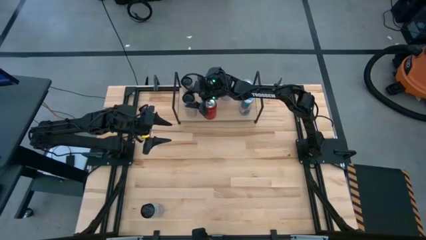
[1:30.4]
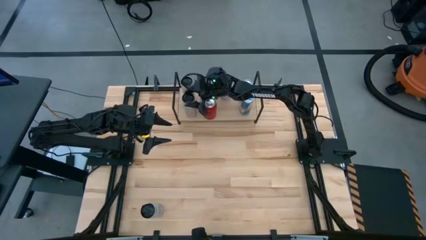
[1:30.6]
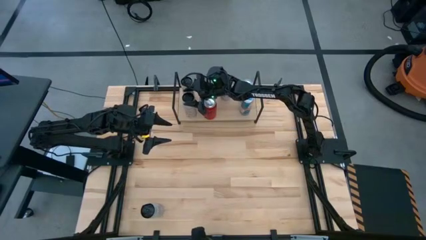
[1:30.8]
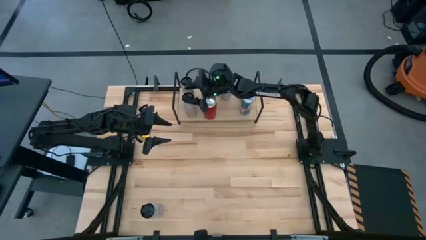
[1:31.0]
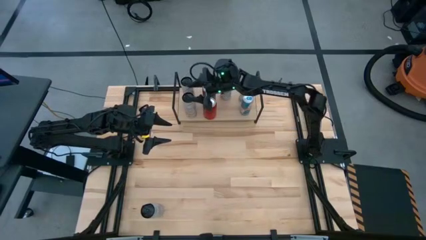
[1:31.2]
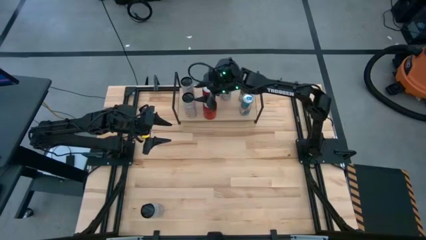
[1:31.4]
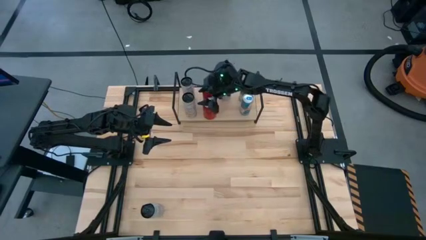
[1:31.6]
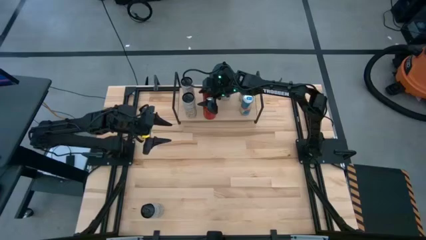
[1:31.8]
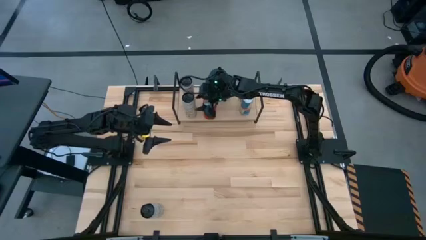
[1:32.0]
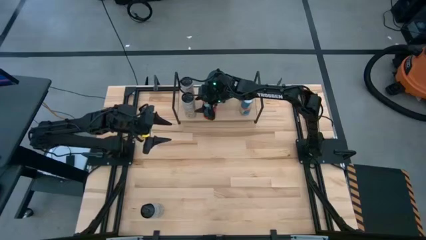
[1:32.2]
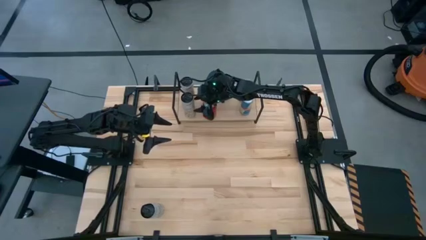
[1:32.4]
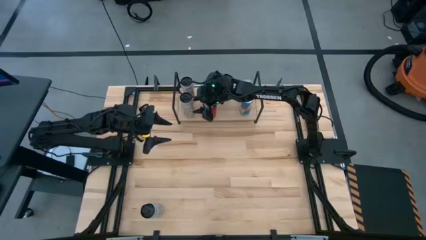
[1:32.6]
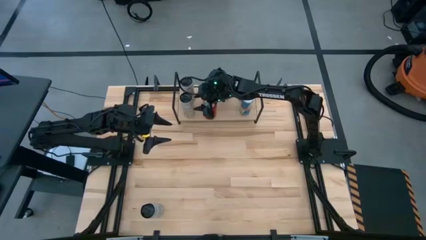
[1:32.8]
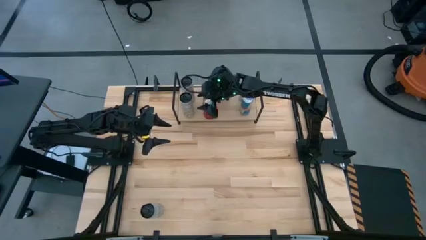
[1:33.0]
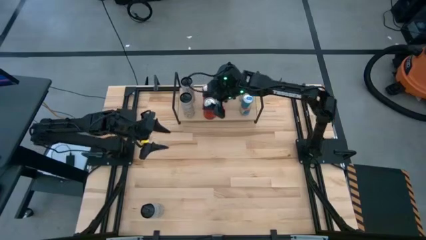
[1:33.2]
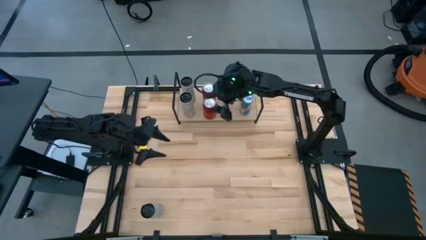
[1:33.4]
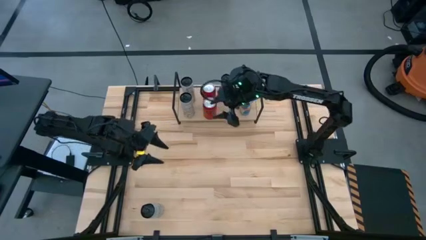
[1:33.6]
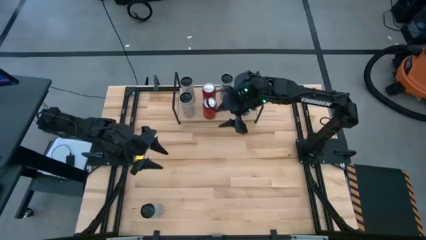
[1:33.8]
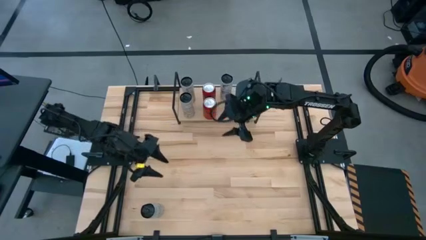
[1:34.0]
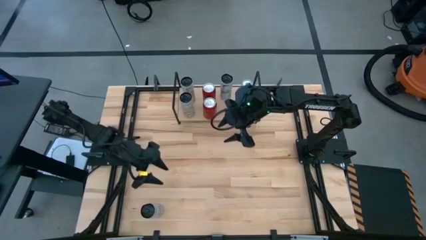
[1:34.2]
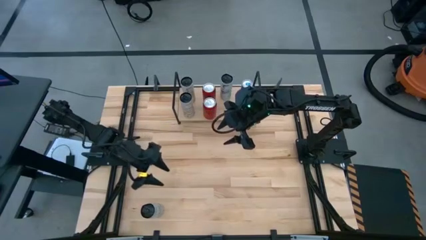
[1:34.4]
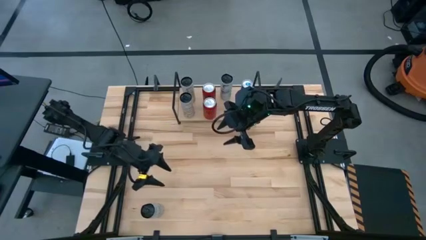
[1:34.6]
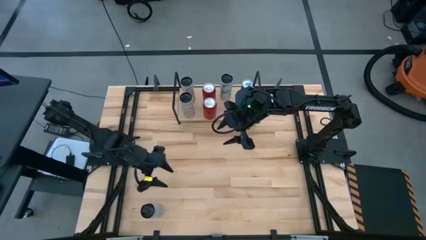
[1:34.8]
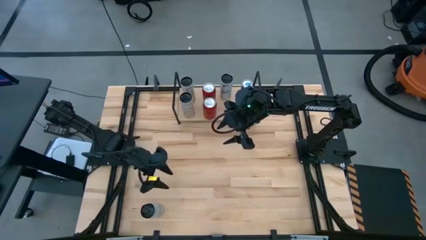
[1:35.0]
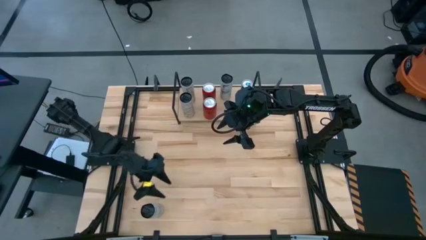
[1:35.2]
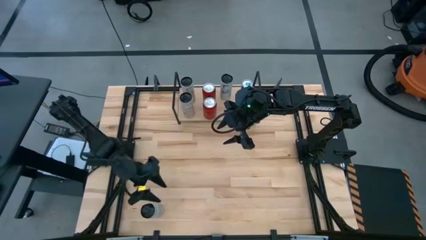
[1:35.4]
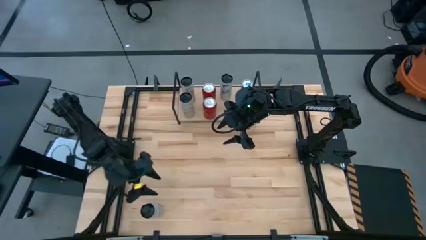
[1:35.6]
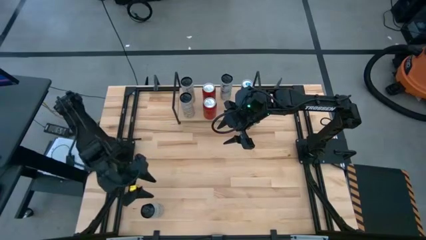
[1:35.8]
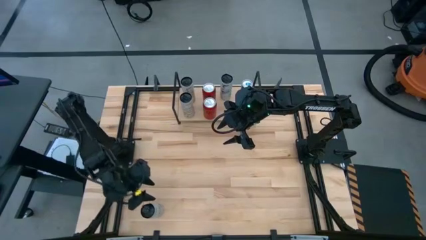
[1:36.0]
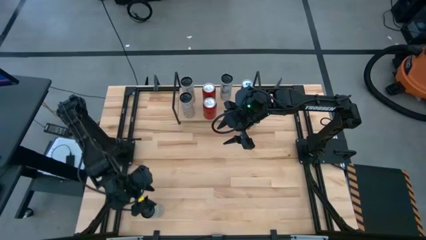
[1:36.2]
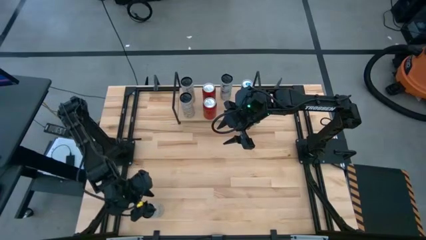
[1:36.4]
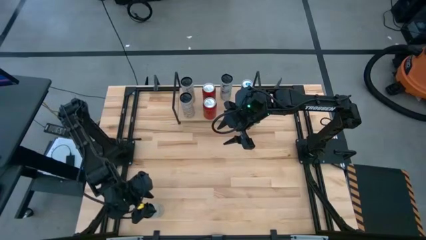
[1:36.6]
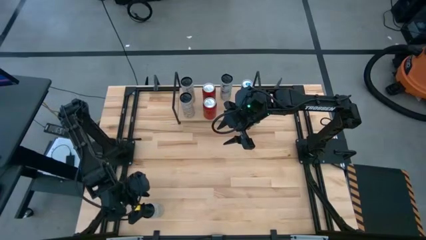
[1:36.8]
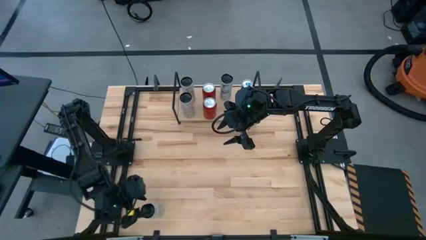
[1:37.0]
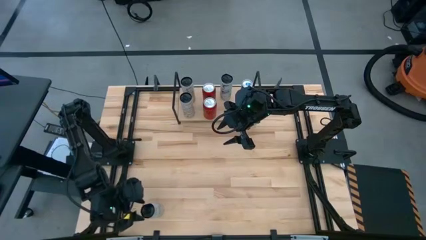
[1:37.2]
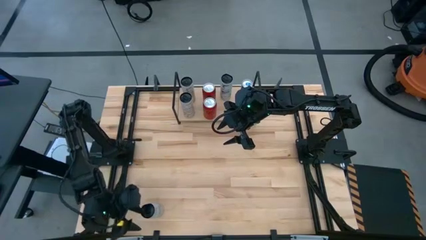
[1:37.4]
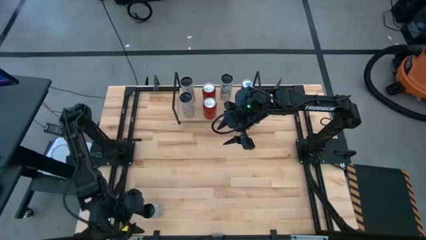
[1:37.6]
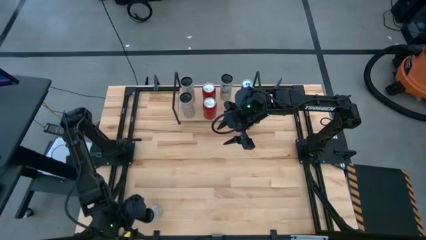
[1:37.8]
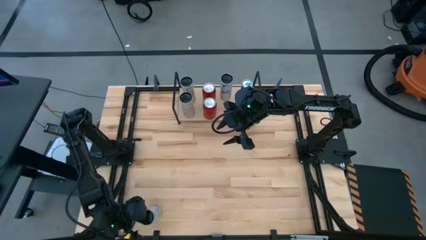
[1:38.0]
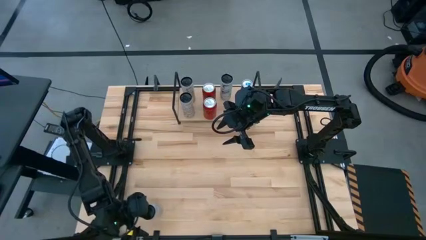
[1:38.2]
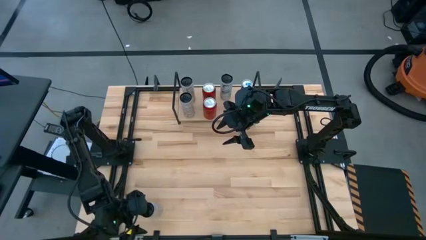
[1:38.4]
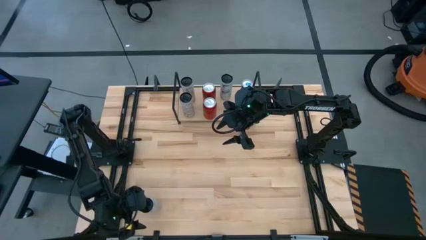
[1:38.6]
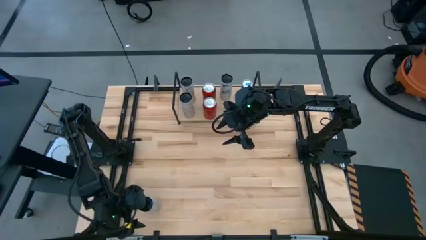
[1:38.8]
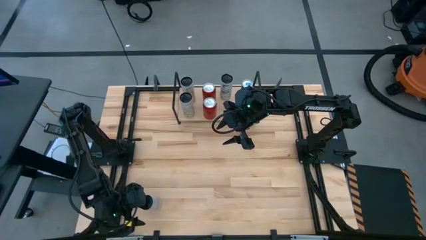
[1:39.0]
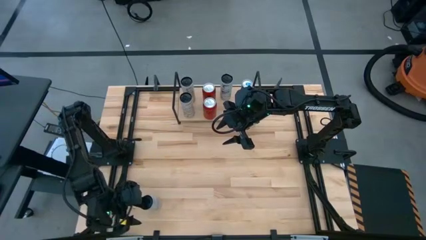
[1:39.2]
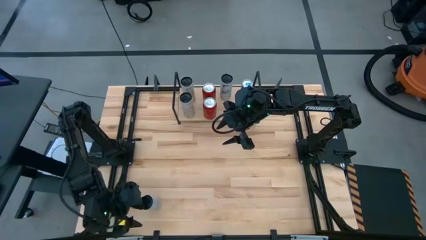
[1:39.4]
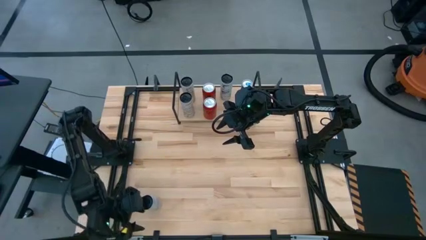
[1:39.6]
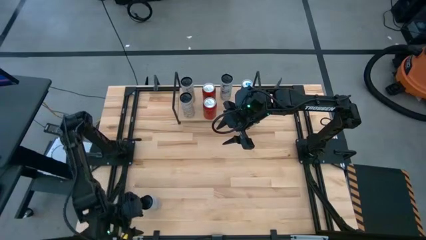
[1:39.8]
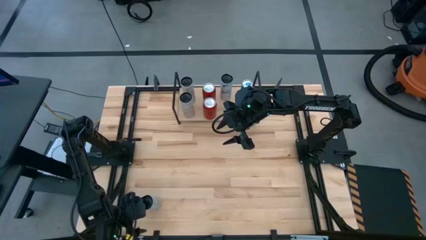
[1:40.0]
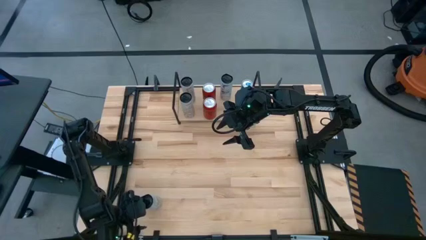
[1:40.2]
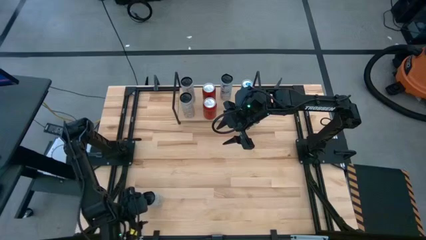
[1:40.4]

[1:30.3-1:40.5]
Task: Place canned beverage on shelf
Put the white soda can on the shelf
